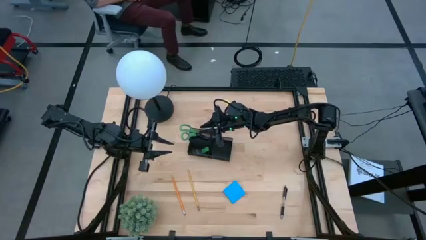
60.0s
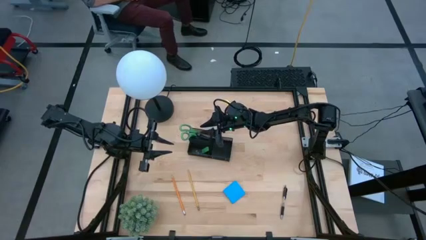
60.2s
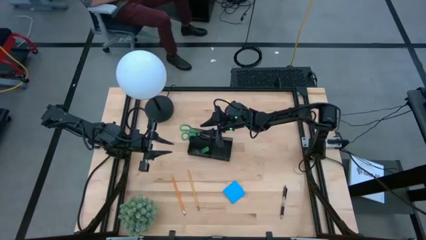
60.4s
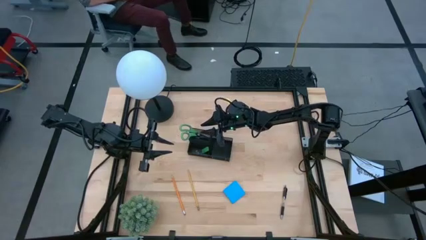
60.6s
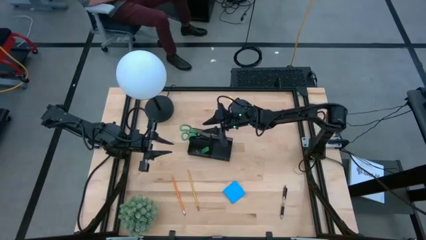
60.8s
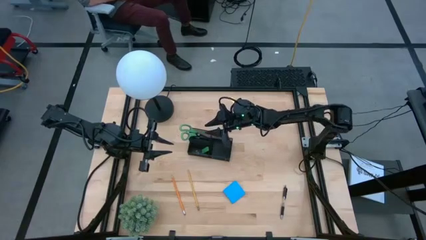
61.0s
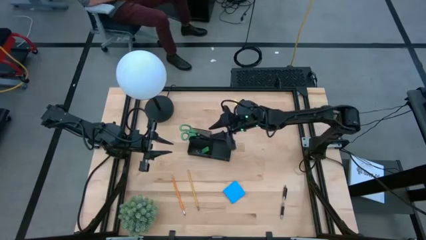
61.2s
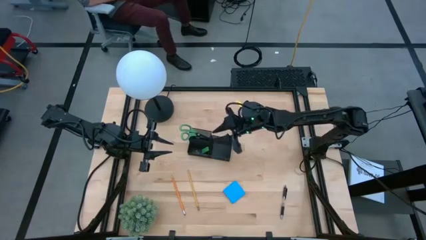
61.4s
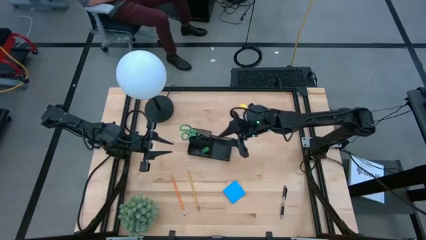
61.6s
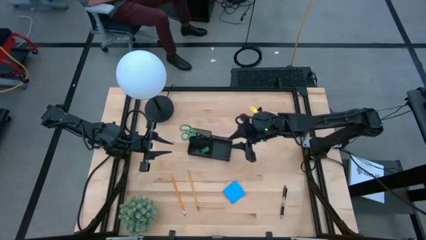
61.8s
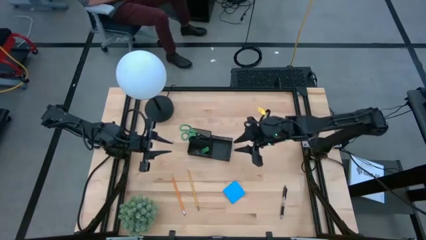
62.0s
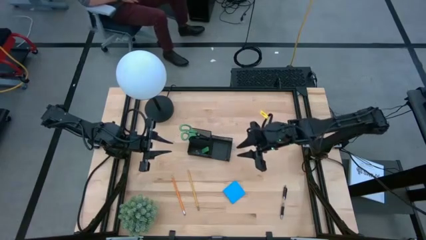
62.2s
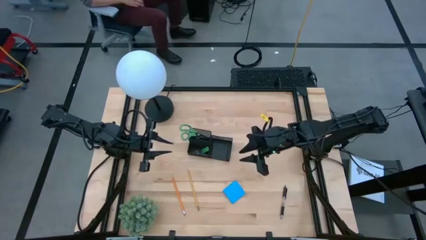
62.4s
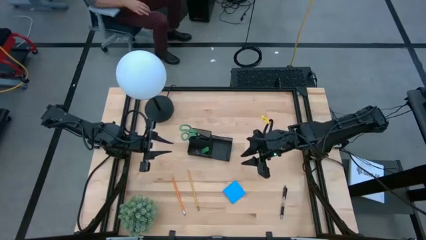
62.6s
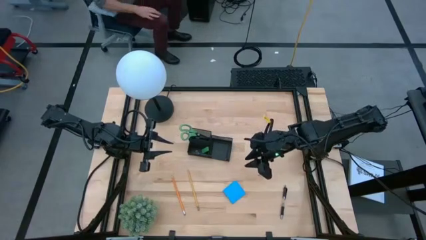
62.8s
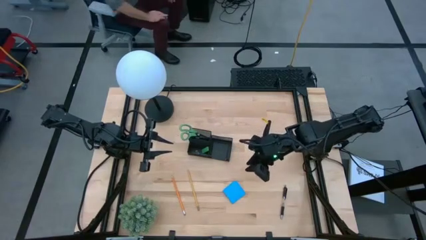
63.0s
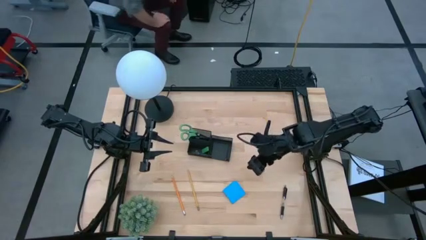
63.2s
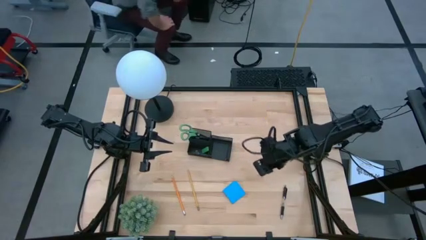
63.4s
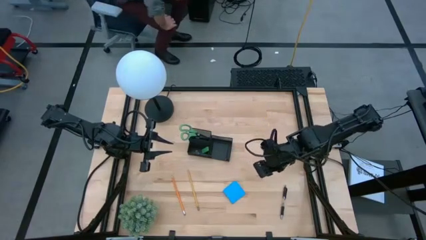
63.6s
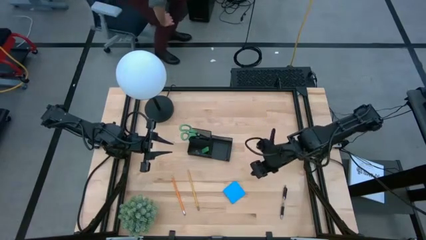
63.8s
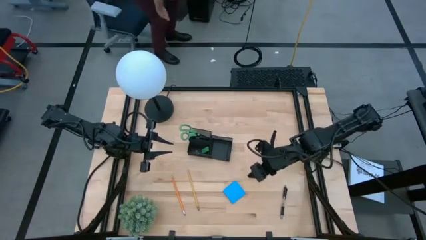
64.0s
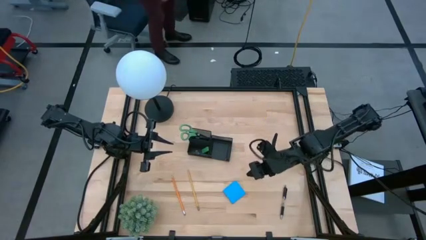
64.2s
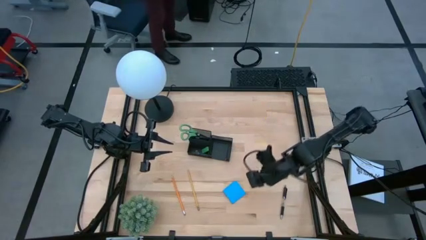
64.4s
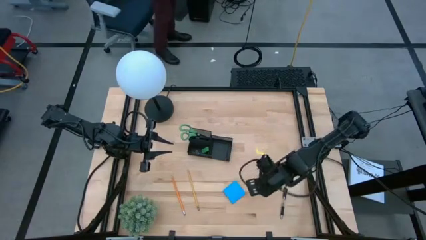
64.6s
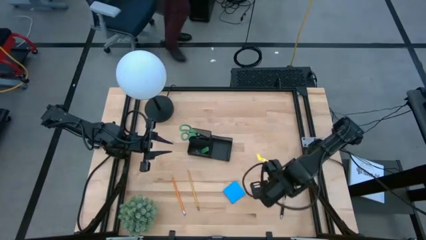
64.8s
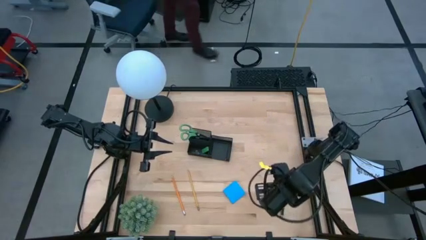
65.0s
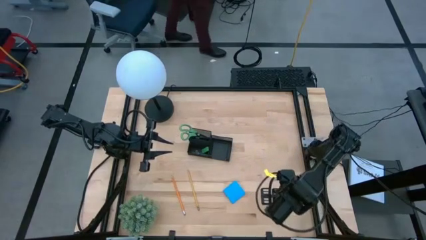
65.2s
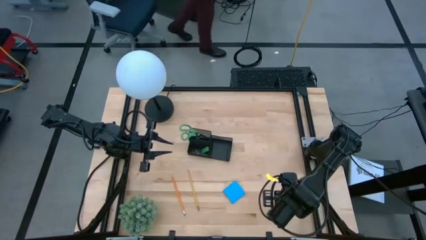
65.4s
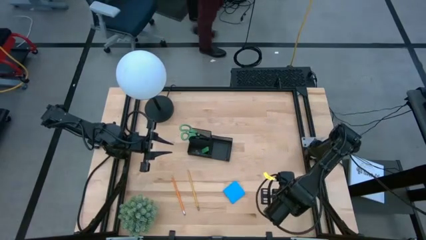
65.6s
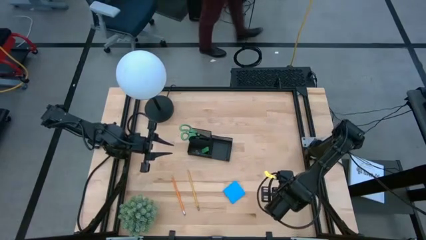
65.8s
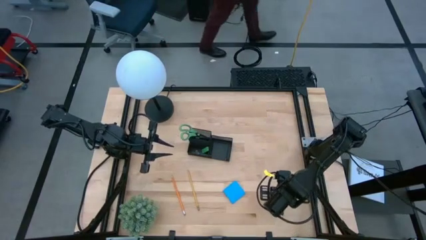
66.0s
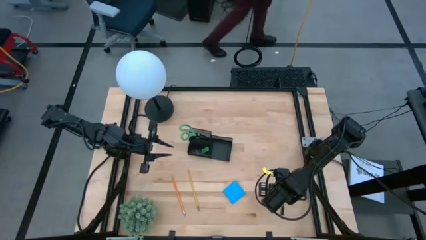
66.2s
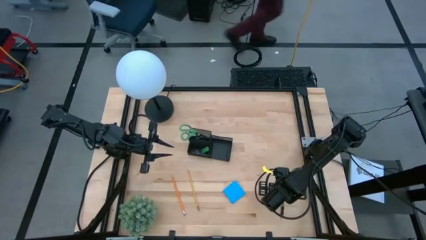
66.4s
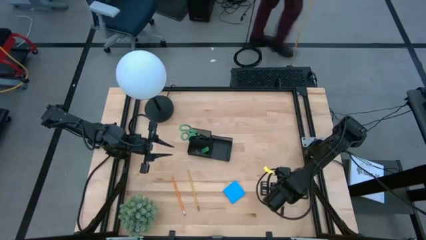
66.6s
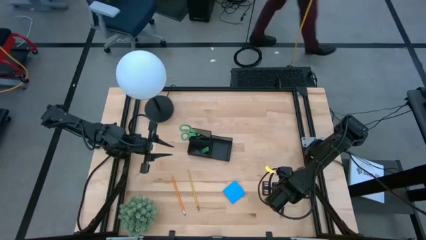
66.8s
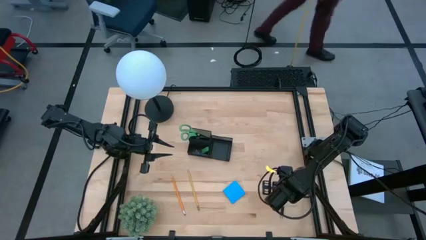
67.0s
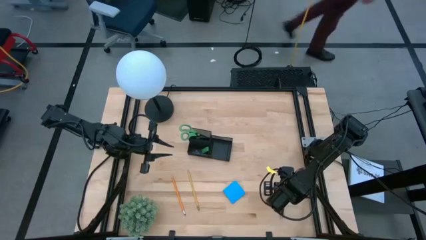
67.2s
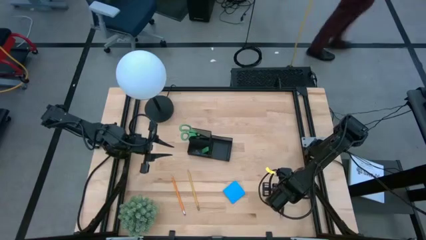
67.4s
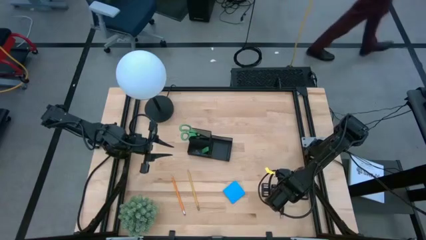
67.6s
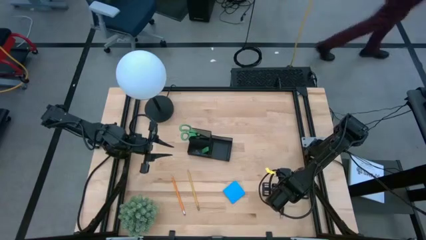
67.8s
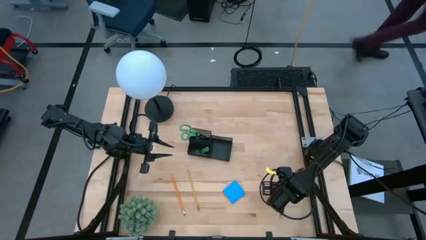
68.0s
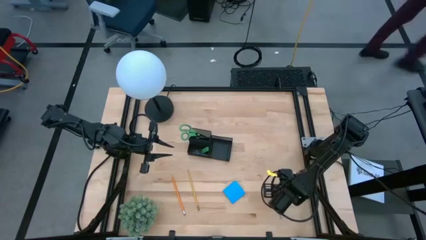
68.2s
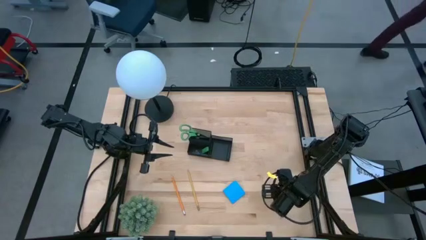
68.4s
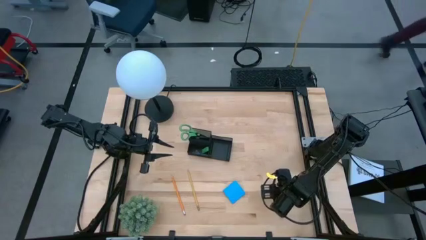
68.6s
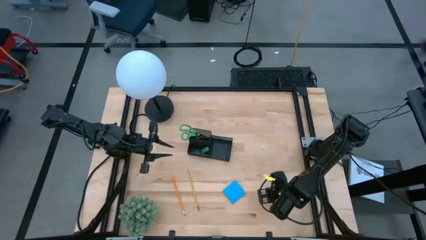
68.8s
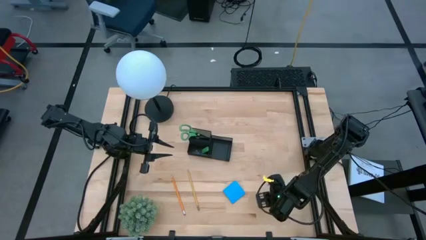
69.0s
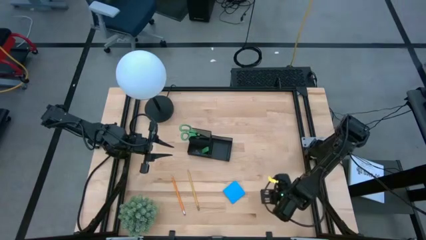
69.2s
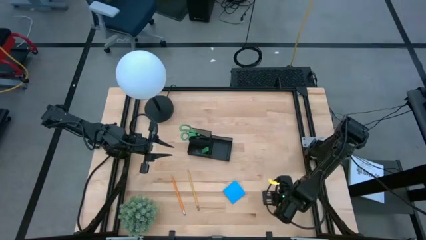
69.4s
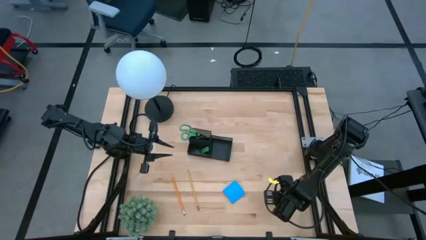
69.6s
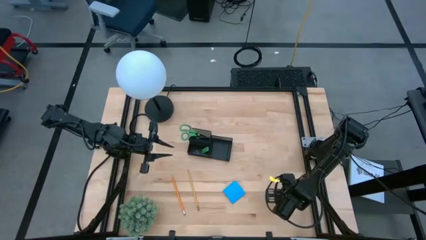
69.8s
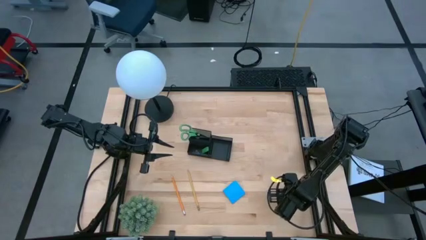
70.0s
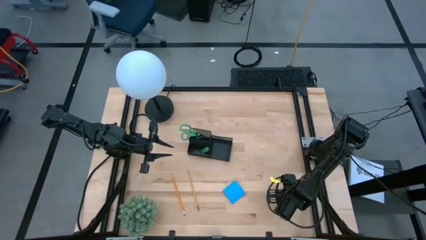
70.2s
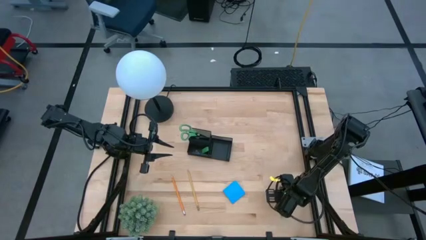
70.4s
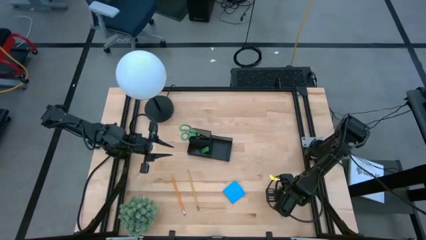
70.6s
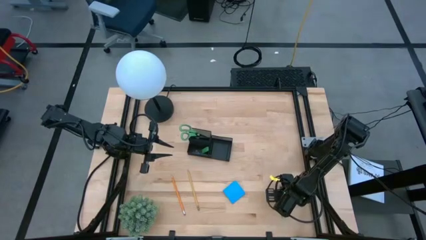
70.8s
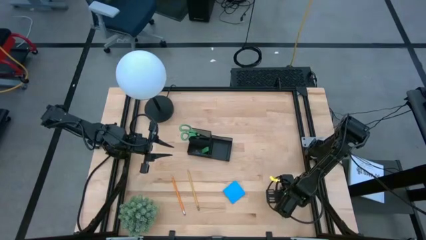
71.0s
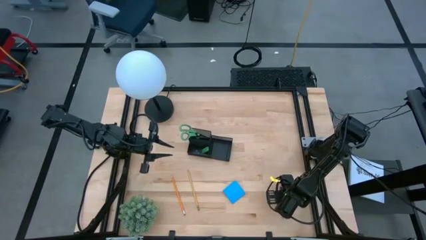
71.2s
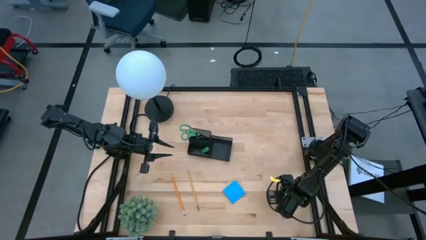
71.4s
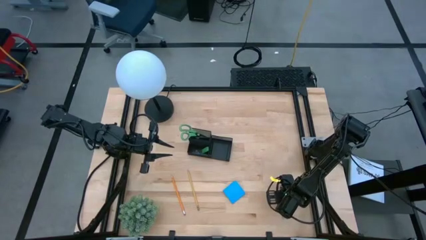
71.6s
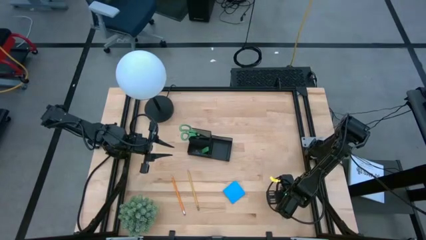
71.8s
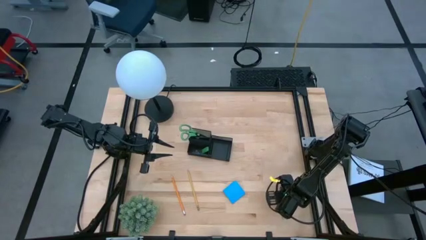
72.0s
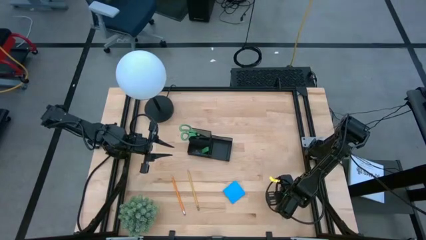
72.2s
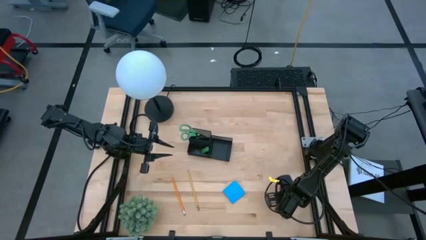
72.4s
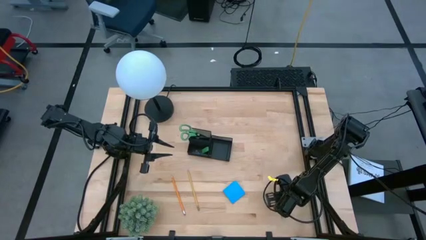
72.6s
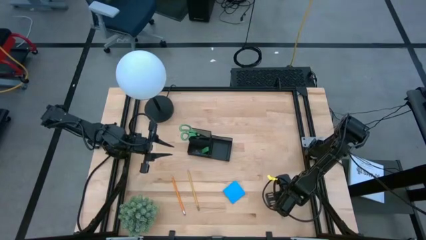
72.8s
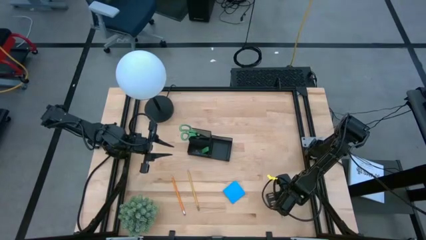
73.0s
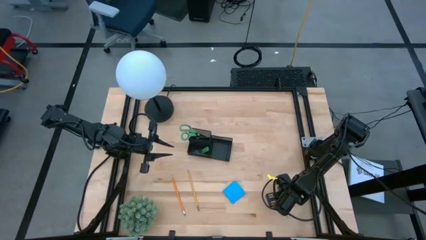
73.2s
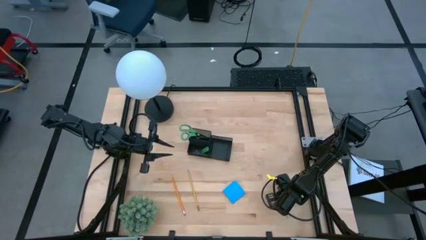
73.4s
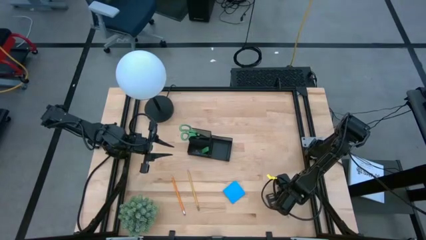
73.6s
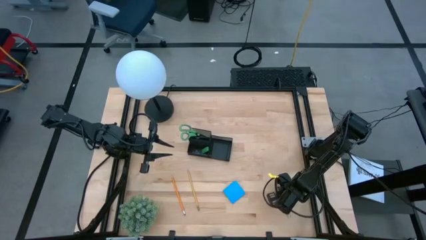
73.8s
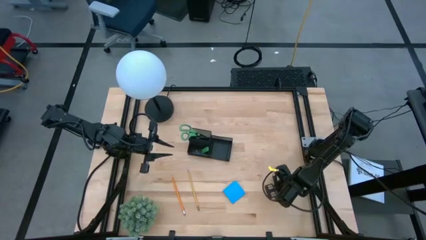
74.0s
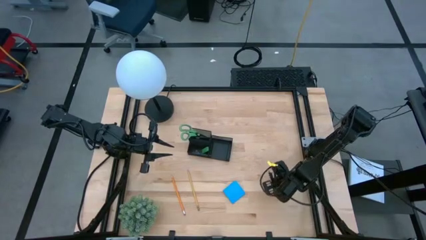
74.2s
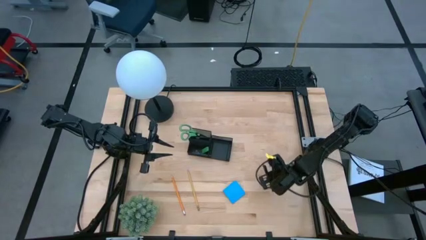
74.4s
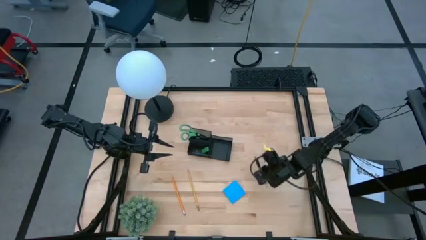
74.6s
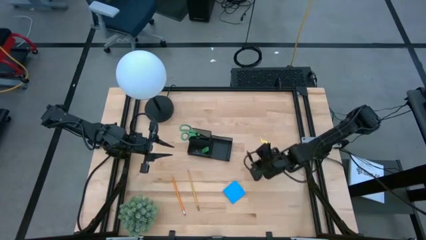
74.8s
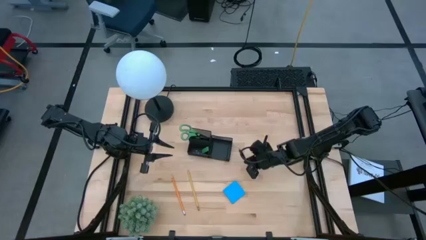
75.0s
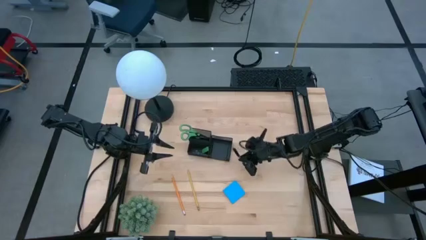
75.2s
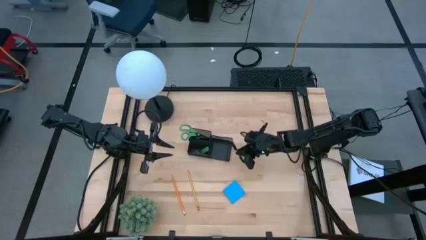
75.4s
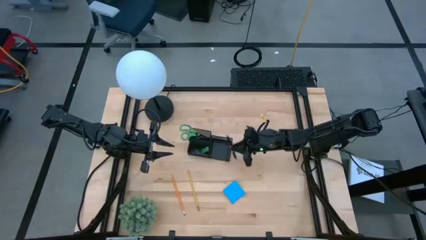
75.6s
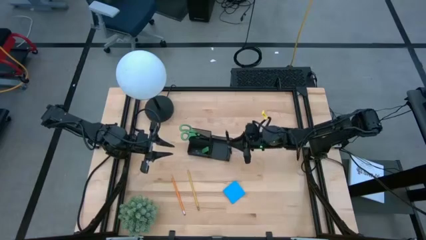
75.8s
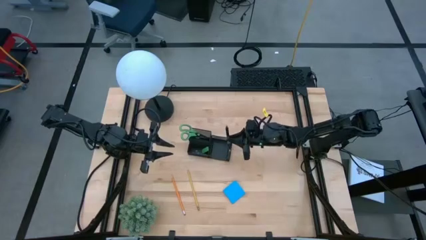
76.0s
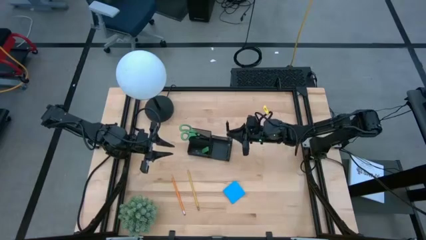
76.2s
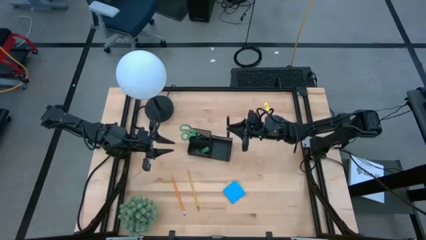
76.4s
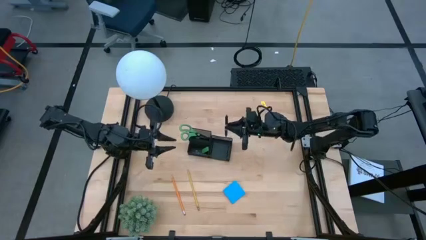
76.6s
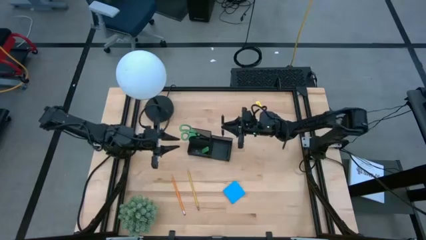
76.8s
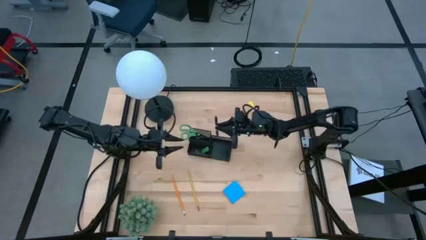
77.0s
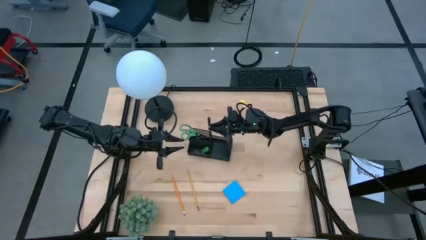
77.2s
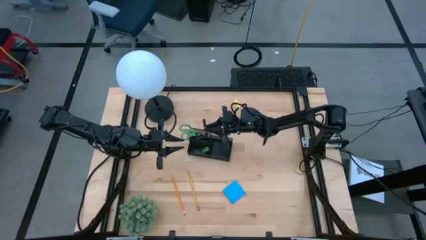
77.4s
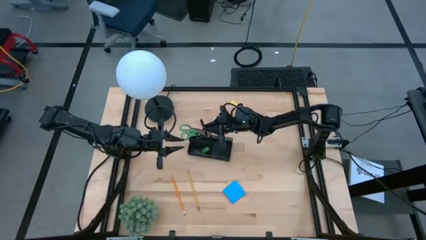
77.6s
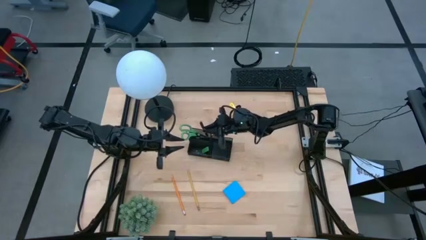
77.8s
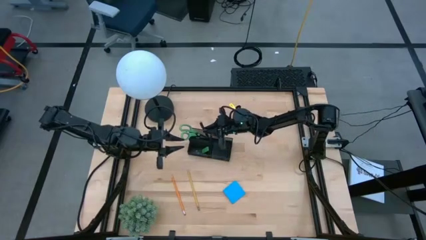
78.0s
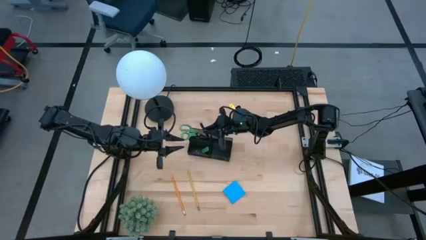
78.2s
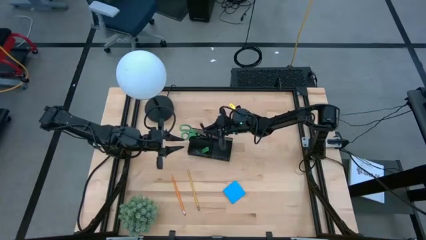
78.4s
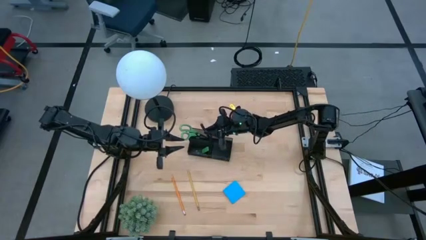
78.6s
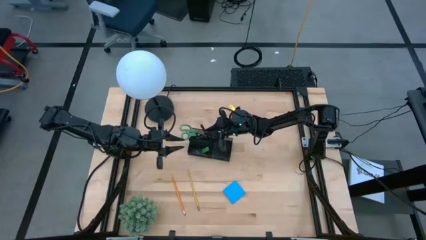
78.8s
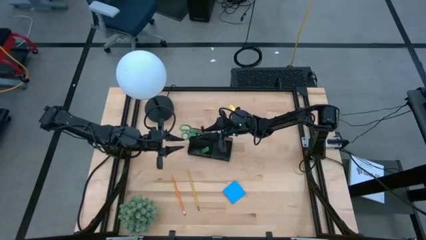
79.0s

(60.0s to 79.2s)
Task: Pick and place office supplies into organizer
Put the black pen into the black desk organizer
